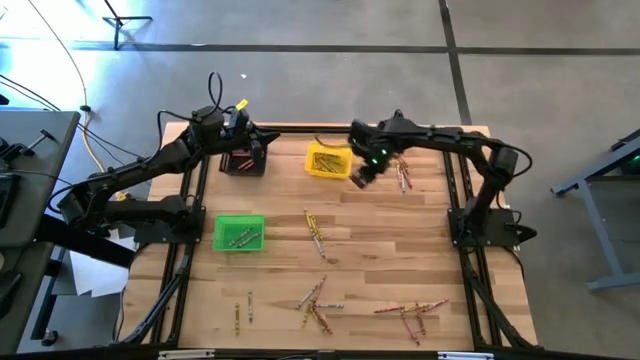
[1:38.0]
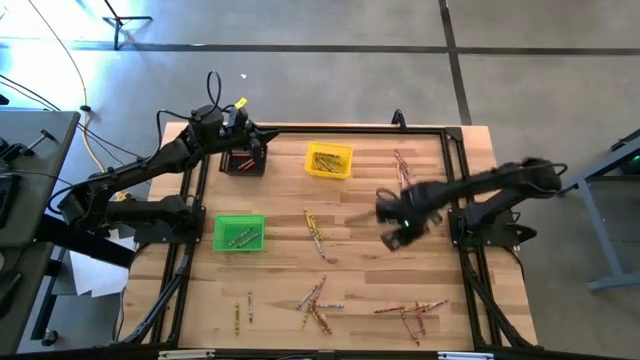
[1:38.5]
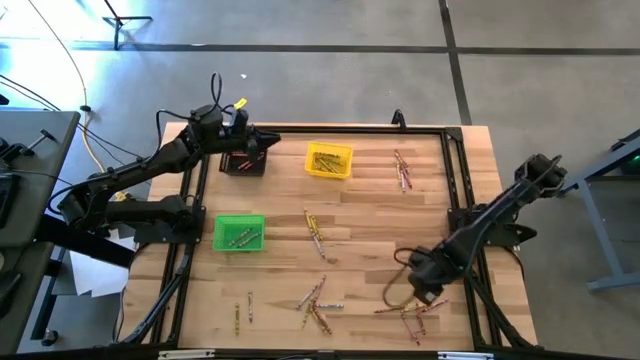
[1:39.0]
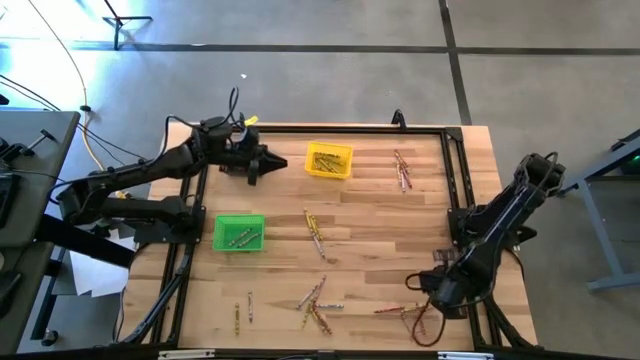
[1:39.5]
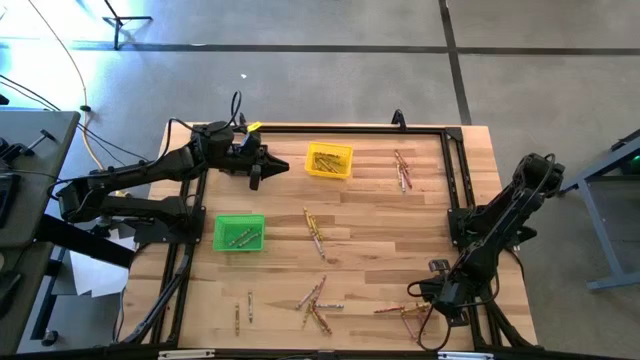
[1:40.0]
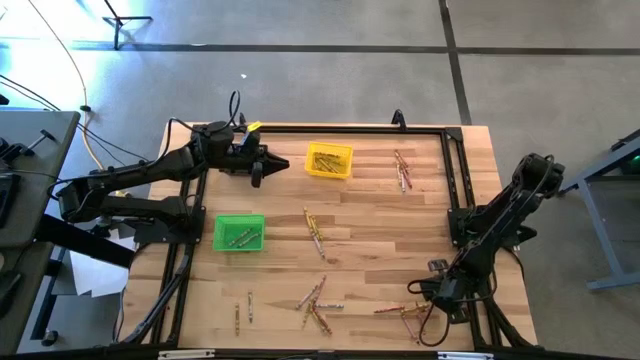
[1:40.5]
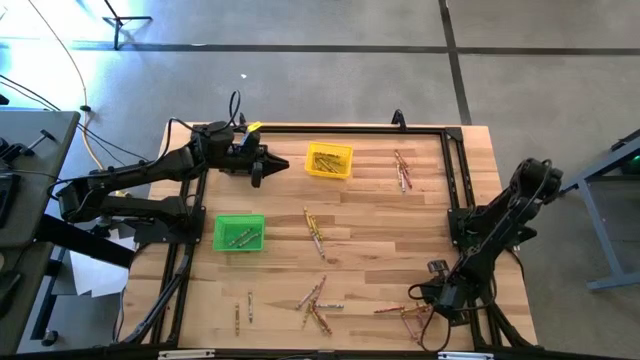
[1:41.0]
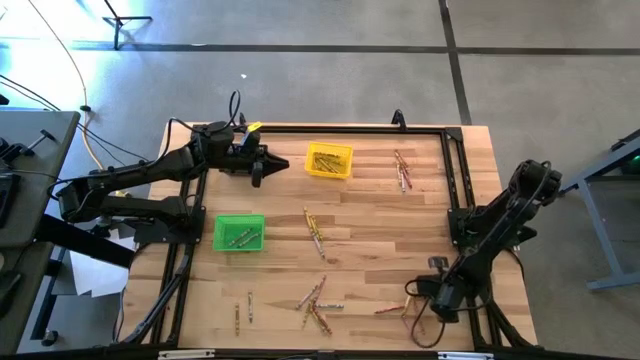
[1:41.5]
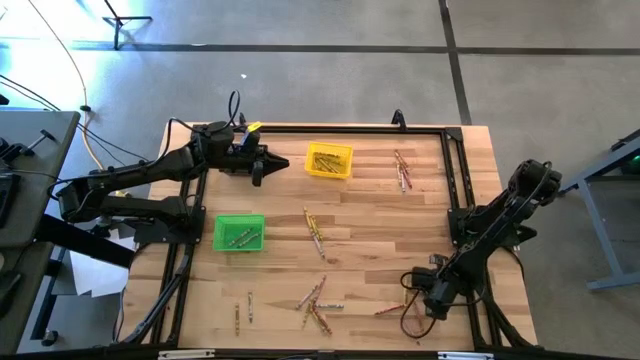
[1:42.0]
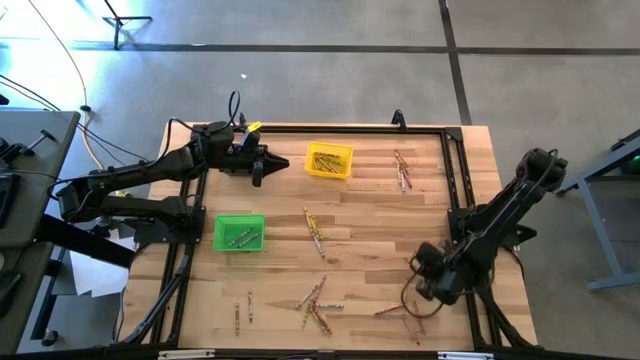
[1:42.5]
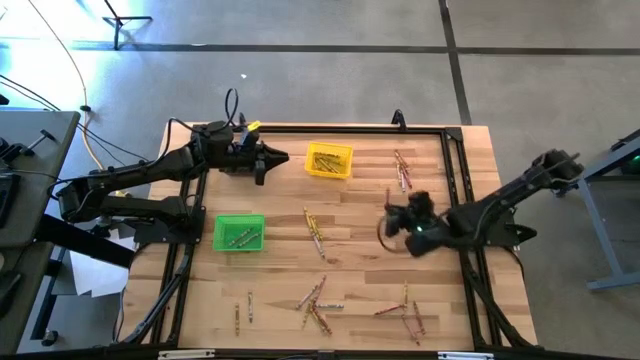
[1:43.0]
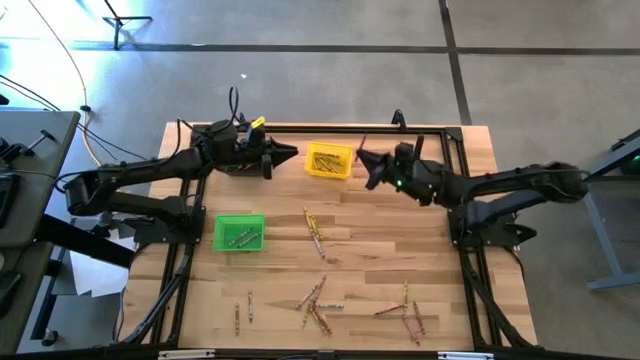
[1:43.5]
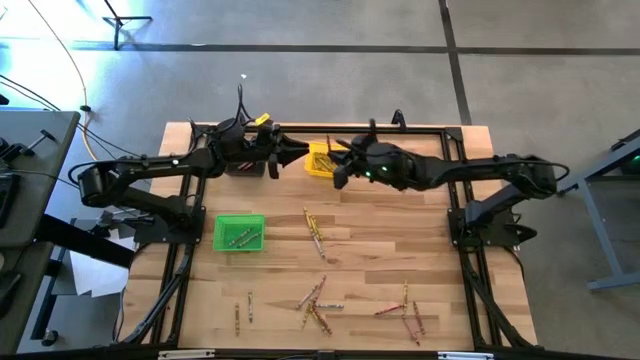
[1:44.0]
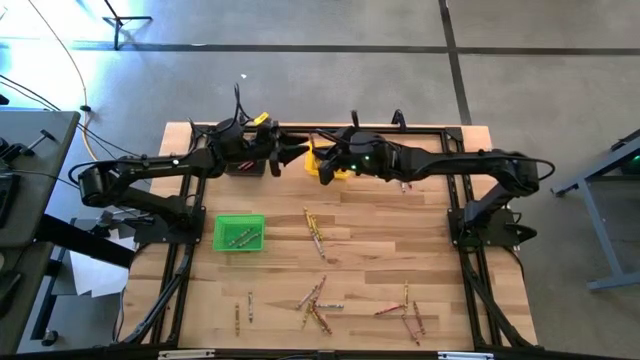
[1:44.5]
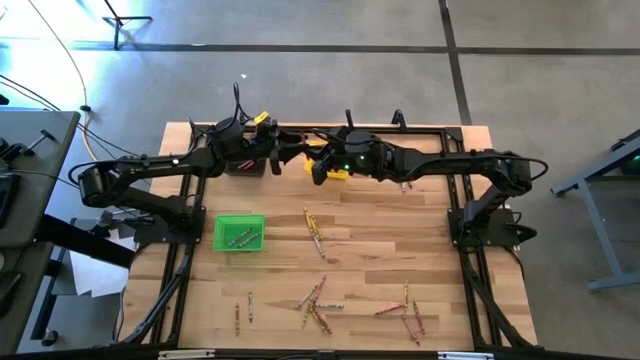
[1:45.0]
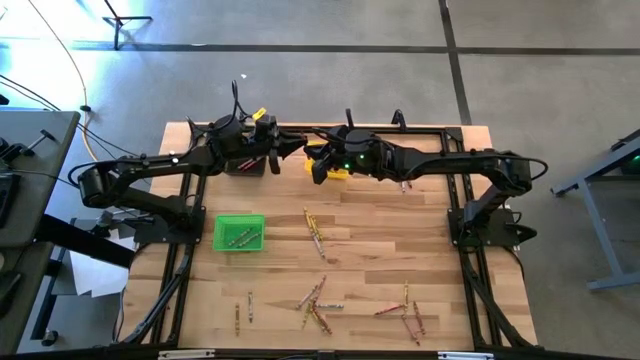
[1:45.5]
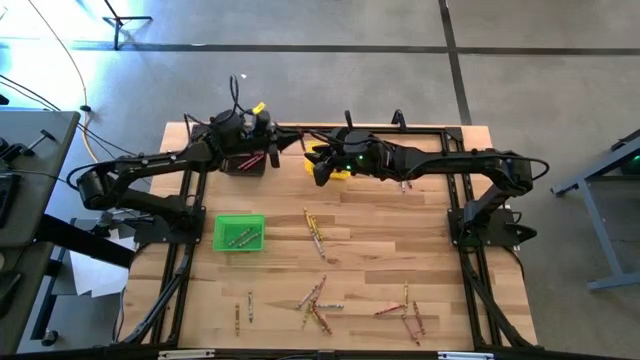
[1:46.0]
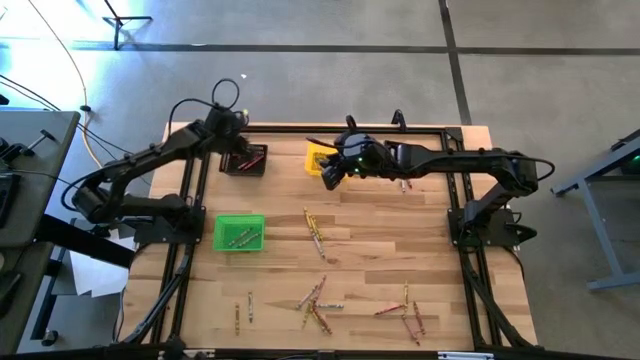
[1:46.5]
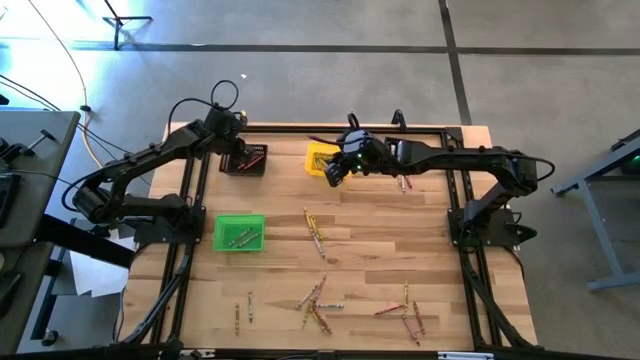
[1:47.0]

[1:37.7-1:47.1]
Task: Sort crayons
Put the red crayon into the black bin

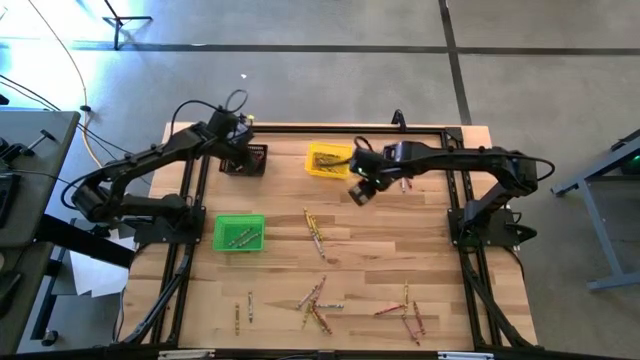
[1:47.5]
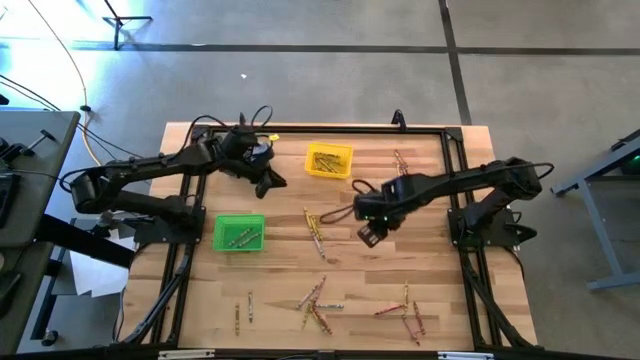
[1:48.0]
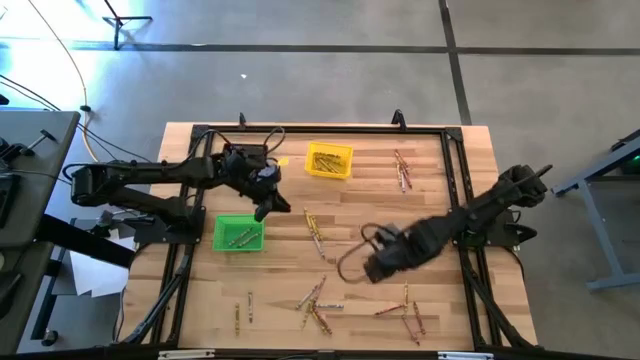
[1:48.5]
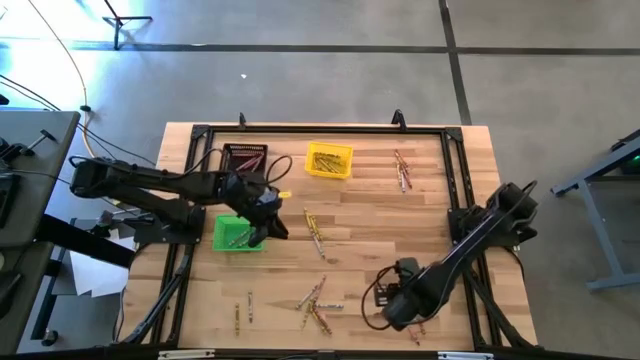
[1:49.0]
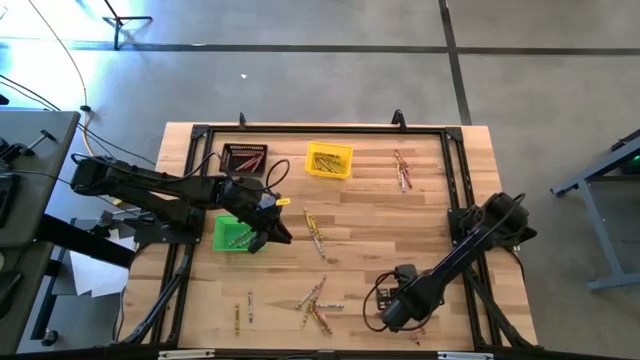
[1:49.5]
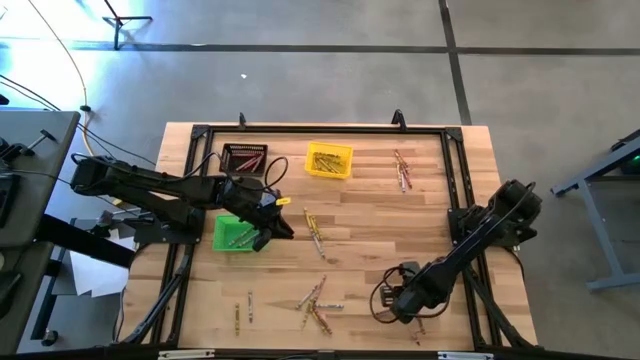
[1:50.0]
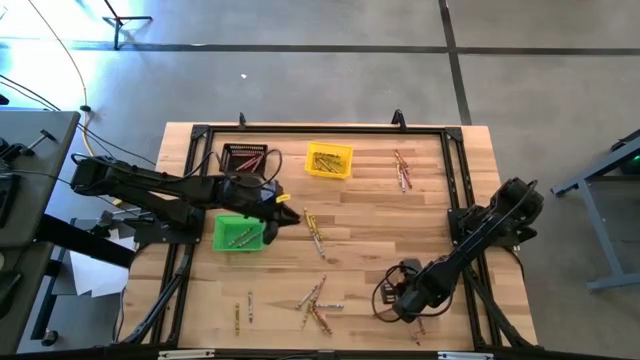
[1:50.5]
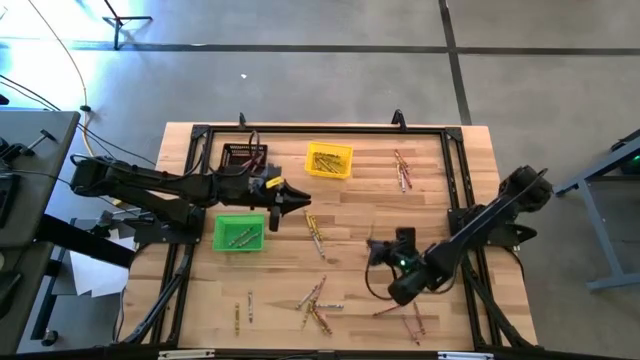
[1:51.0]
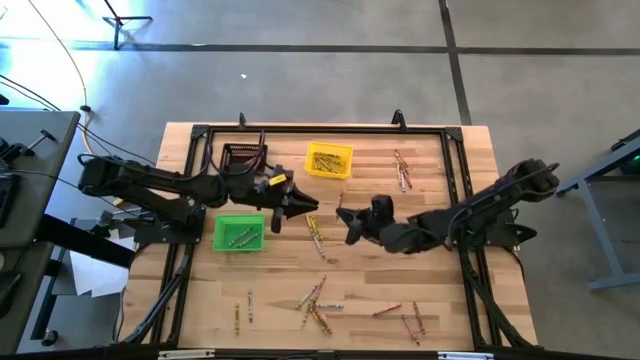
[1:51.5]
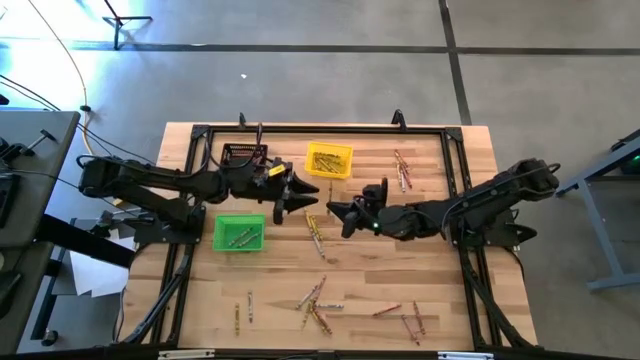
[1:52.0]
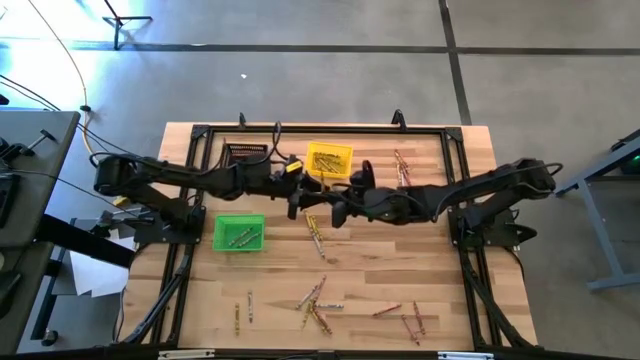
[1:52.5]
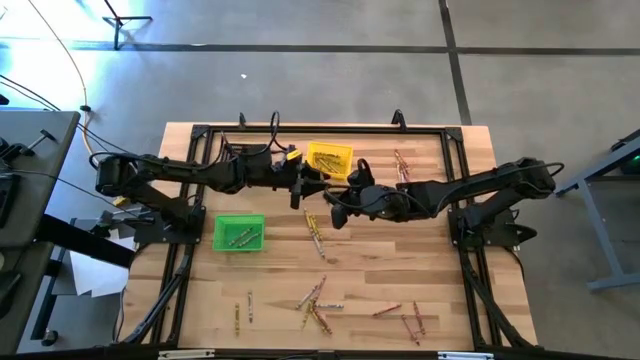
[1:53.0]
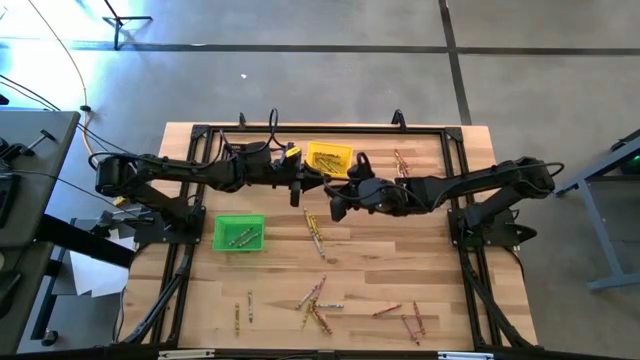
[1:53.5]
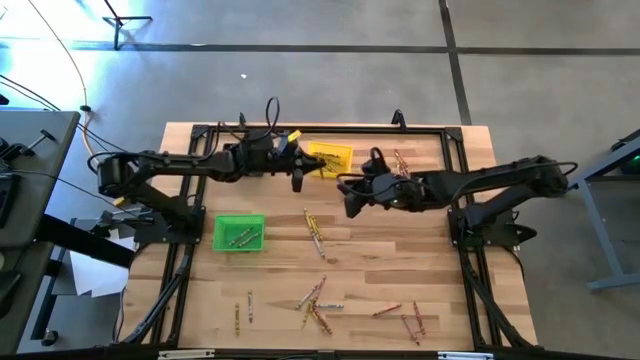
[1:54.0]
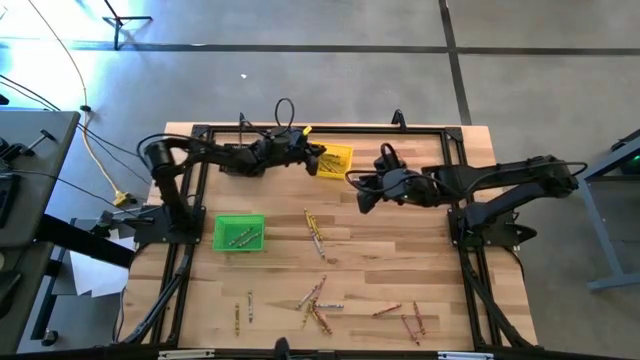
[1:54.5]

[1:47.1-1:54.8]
Put the yellow crayon into the yellow bin

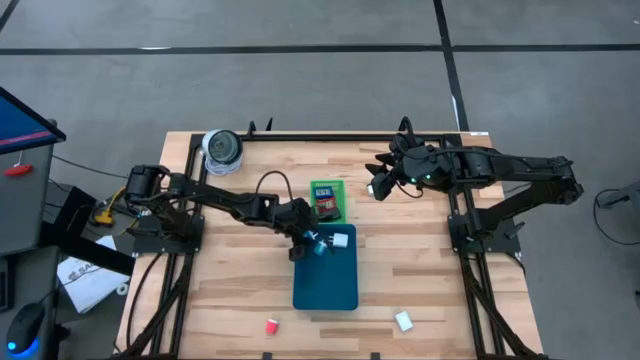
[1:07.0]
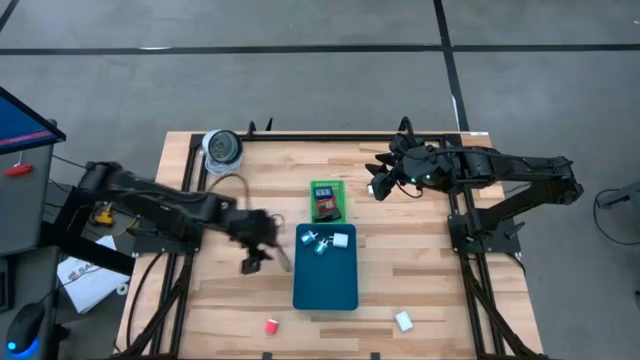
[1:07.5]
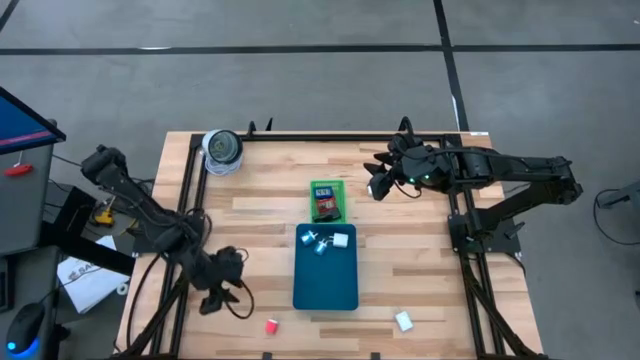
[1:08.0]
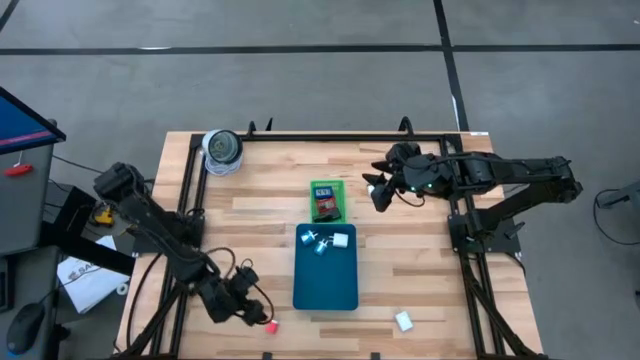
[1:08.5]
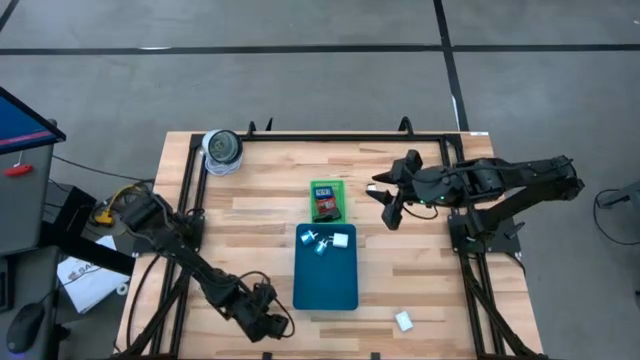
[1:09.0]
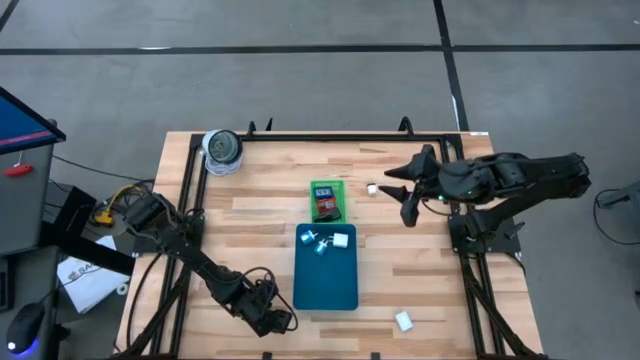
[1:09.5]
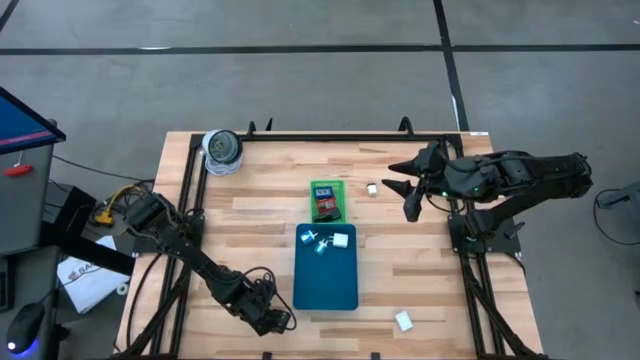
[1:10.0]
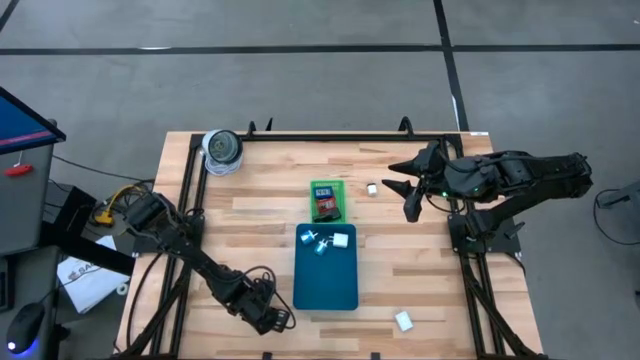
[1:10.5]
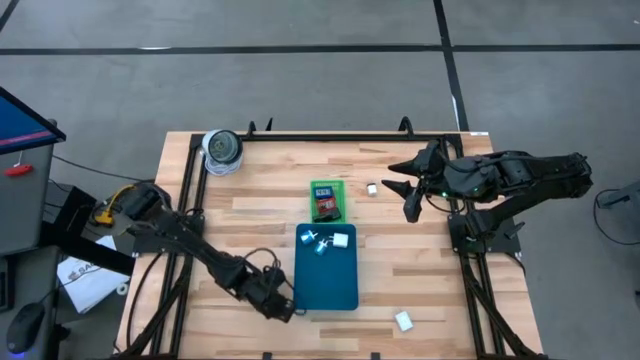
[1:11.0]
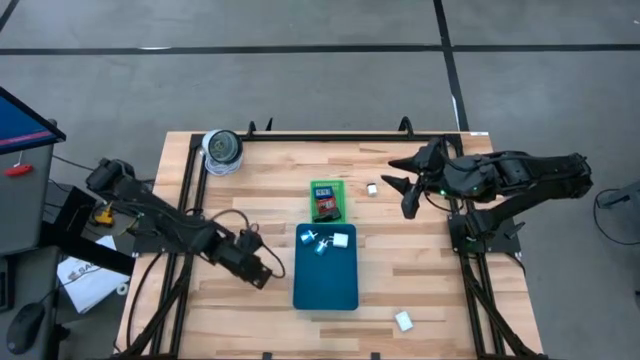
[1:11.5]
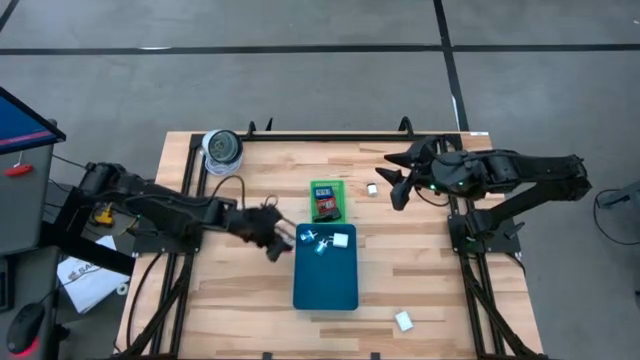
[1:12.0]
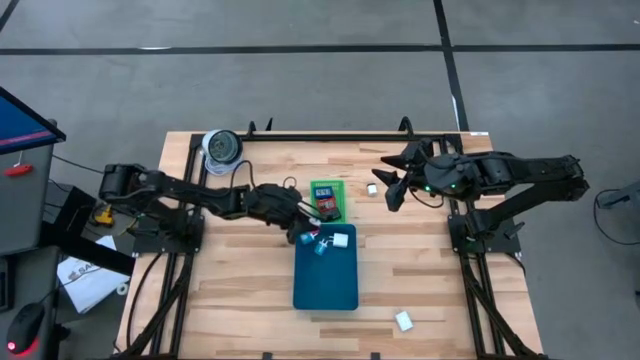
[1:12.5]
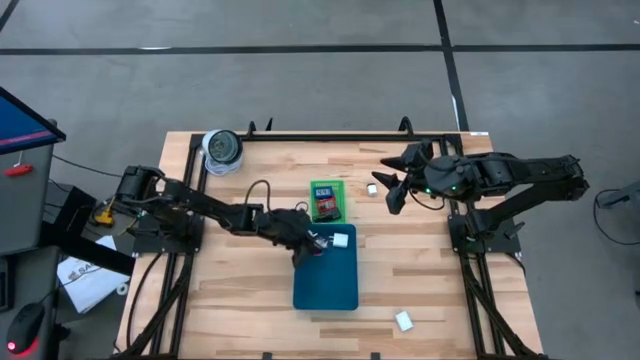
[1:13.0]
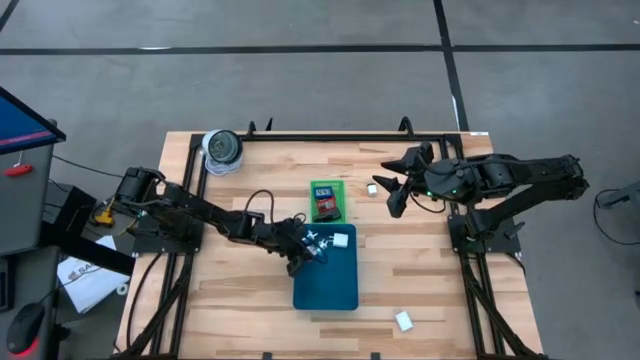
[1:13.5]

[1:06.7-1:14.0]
Task: Pick & Place Office items
Put the red charger adapter into the blue bin
